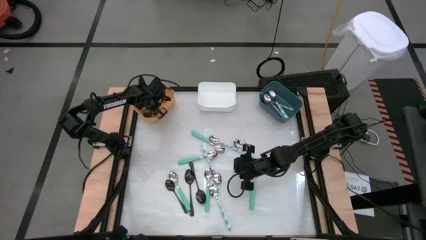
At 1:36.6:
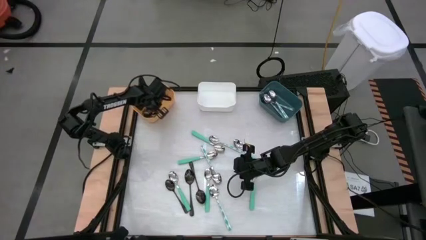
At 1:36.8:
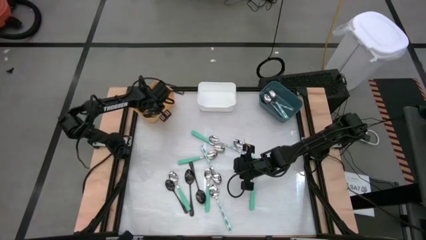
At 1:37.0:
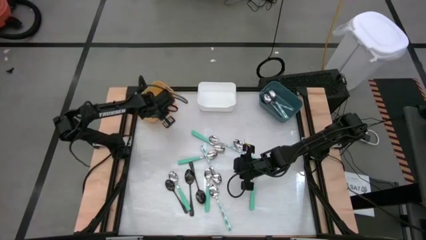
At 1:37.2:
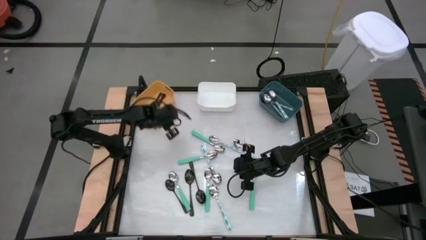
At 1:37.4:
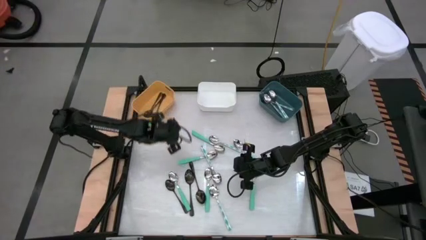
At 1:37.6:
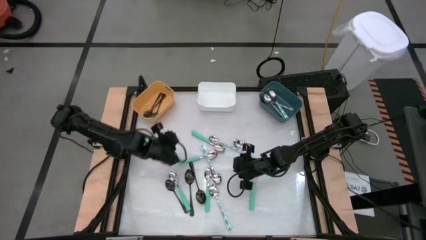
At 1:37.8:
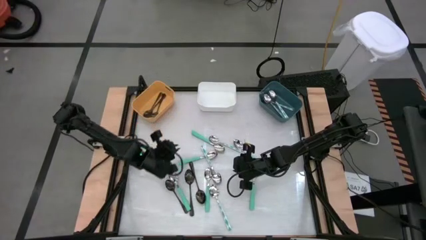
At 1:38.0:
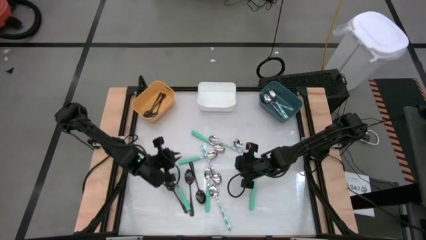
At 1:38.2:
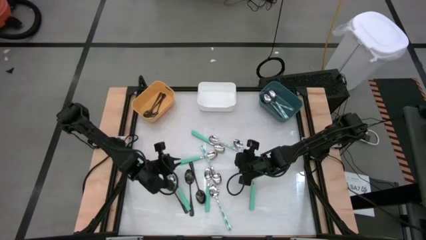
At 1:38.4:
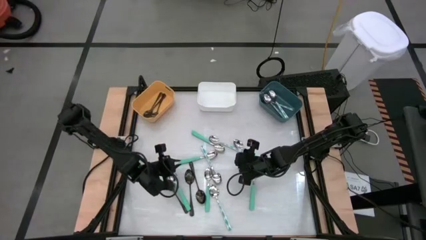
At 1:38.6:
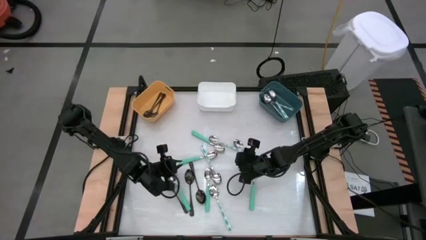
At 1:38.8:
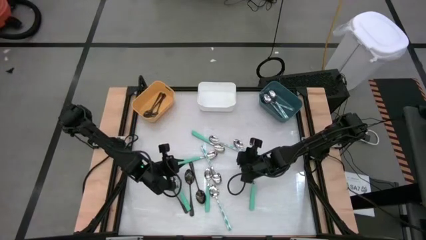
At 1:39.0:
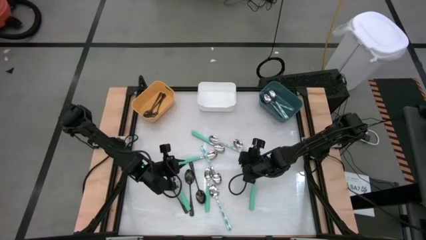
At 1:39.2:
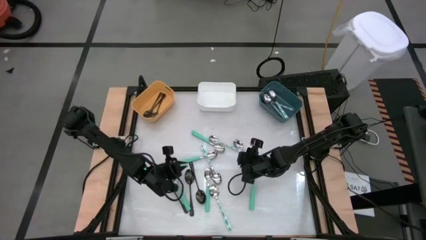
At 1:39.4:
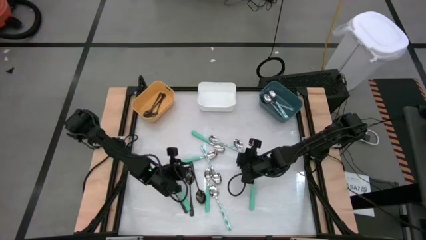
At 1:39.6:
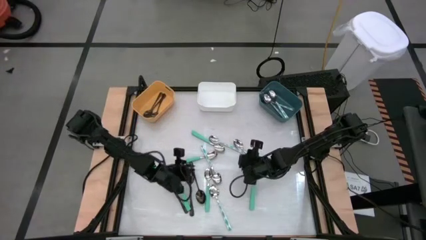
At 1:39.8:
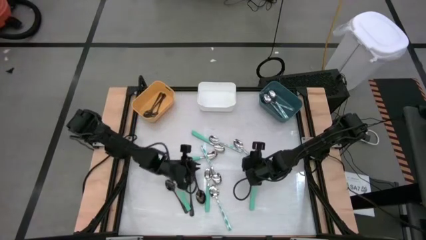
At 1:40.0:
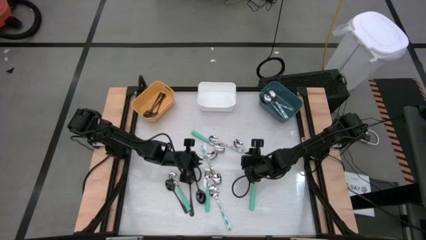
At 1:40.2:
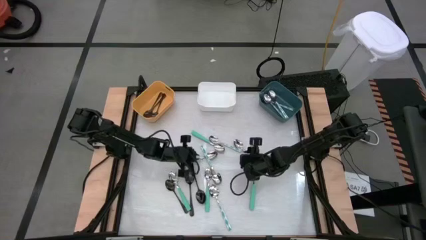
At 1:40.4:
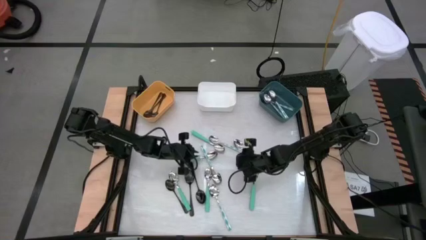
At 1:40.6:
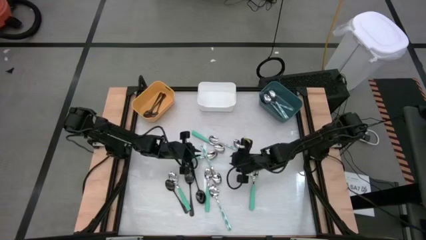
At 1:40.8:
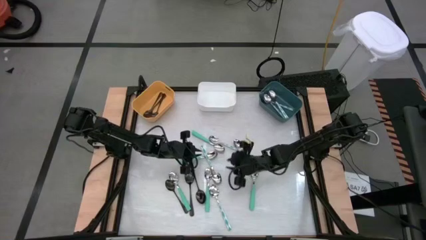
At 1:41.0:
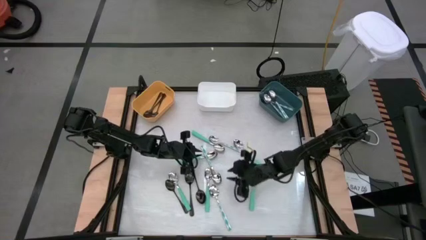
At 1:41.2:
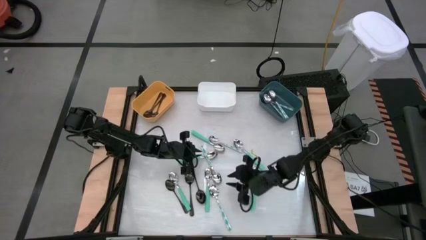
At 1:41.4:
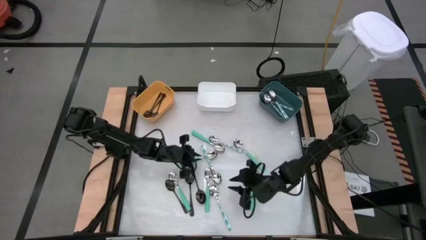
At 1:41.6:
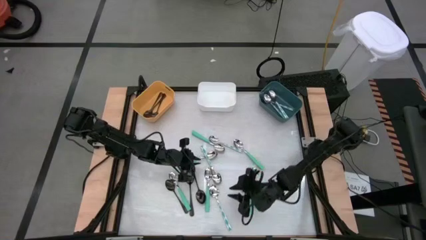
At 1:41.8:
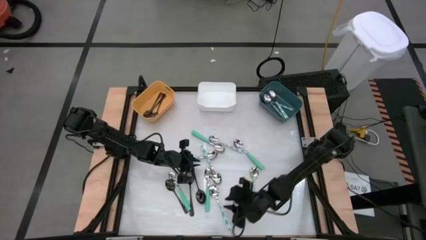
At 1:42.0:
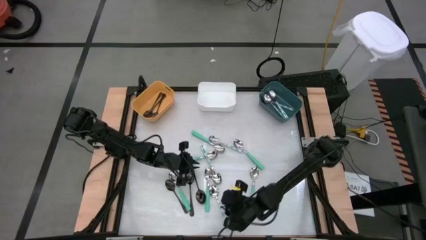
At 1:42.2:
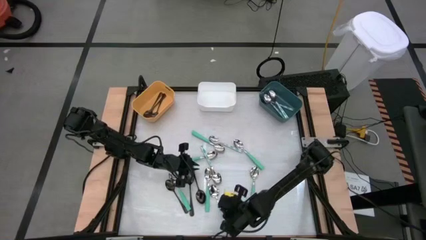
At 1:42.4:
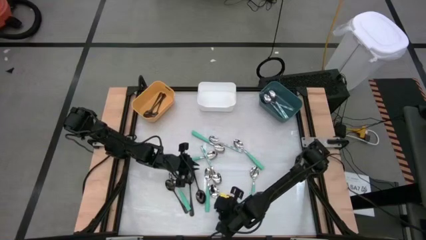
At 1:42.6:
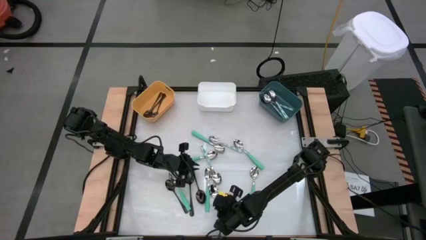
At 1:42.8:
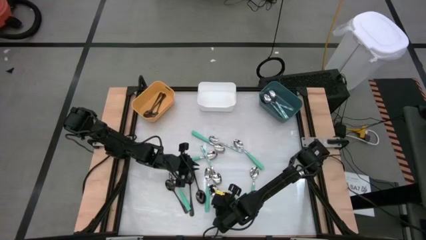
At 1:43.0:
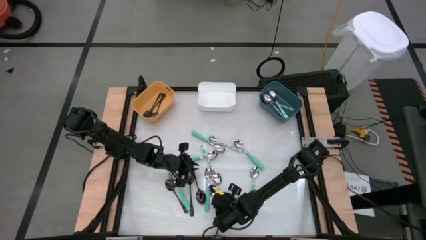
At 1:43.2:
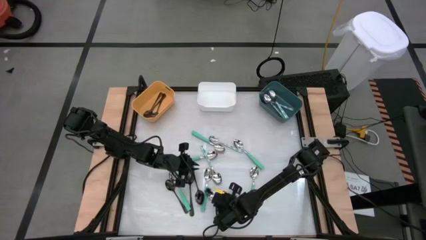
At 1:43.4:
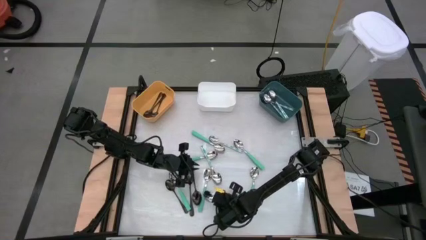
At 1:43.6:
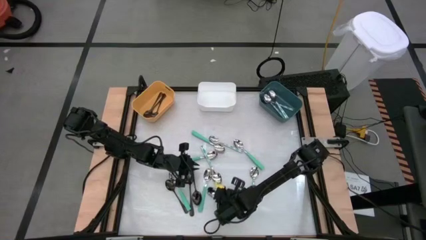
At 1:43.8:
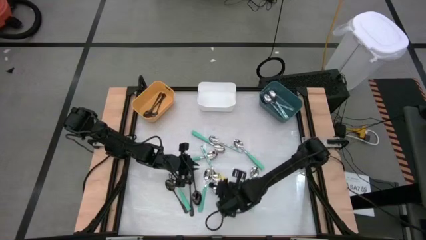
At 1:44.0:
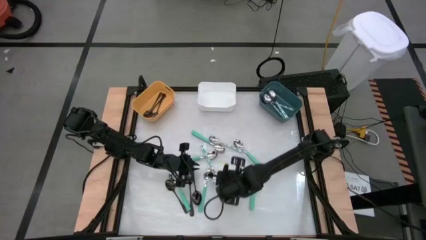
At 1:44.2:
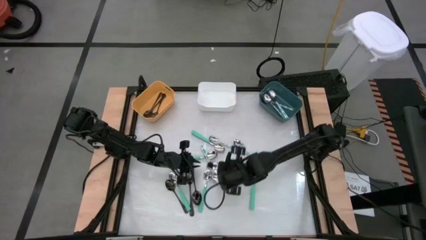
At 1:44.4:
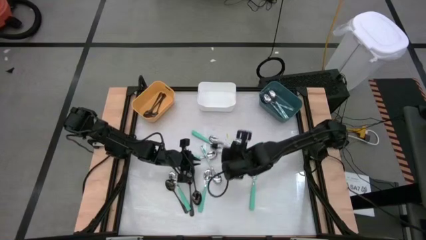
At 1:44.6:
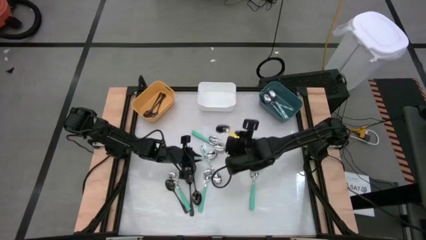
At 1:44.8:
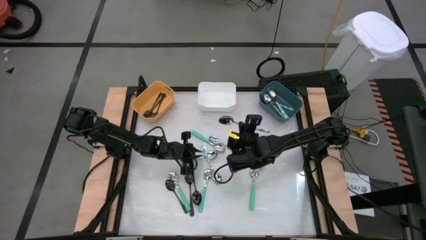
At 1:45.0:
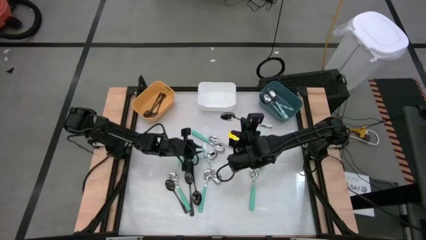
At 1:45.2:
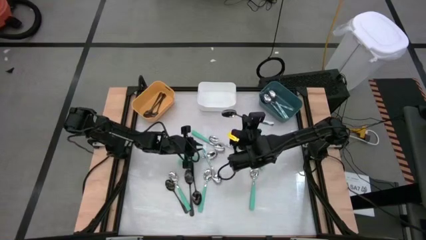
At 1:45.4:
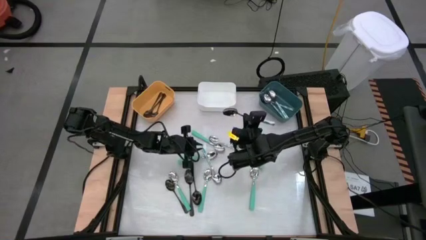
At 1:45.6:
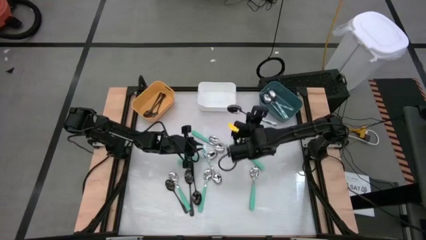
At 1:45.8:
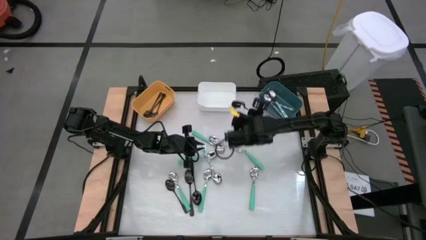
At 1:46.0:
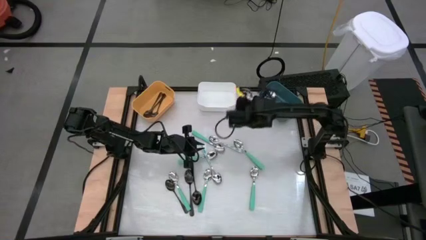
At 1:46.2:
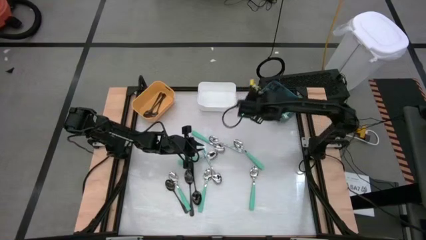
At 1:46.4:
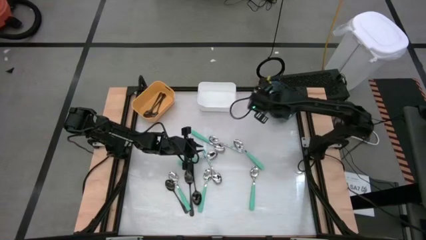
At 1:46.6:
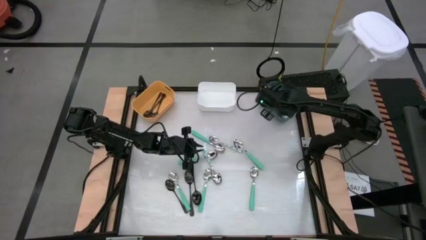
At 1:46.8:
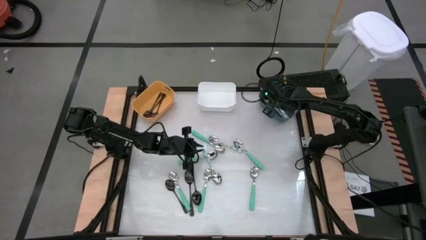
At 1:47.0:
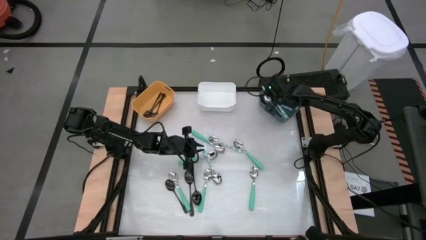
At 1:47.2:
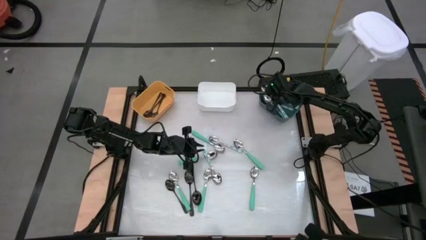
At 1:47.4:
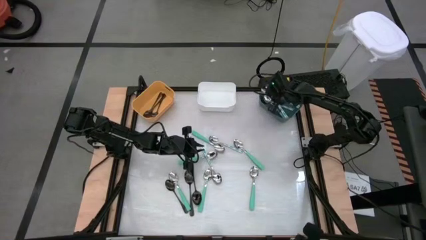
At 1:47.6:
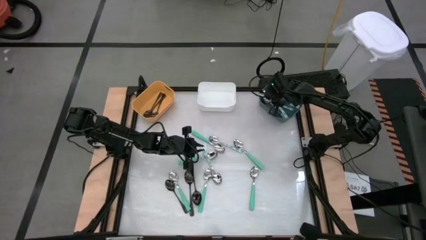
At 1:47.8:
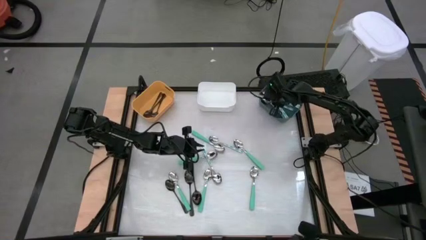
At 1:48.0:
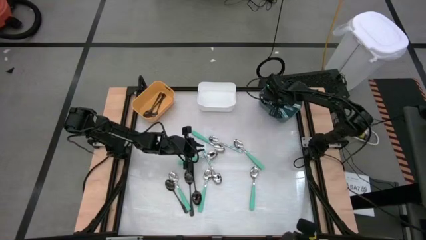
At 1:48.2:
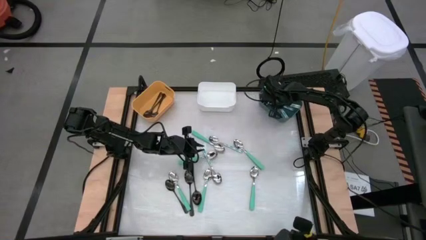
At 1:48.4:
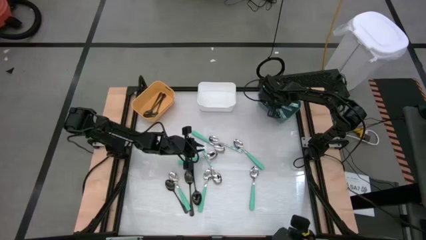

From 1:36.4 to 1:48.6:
Task: Sort silverware by color (type)
Put the blue patterned spoon into the blue bin

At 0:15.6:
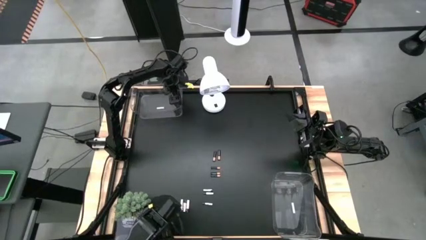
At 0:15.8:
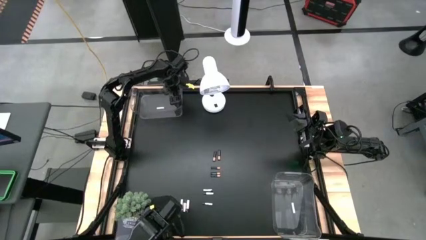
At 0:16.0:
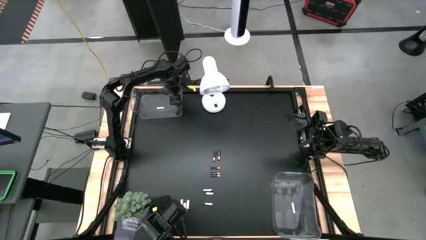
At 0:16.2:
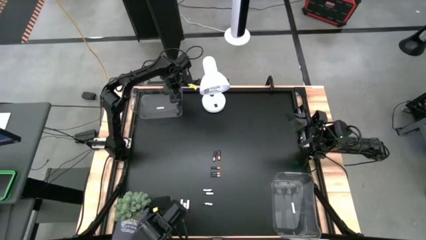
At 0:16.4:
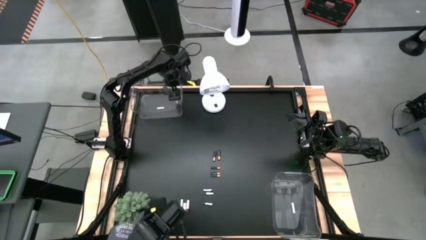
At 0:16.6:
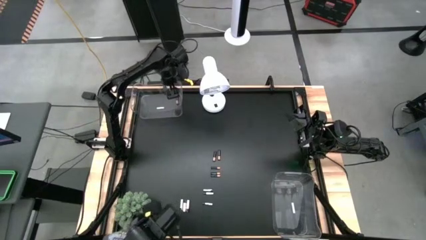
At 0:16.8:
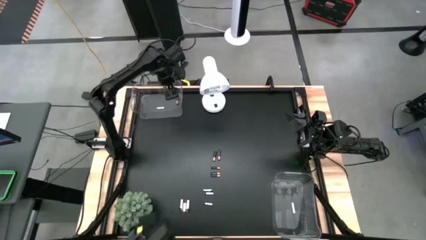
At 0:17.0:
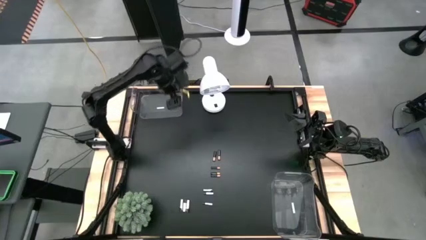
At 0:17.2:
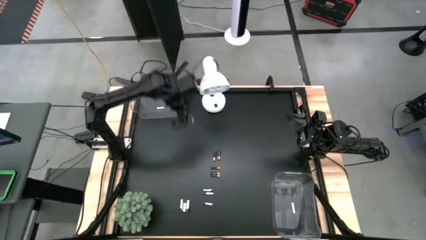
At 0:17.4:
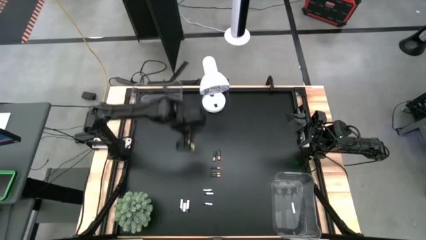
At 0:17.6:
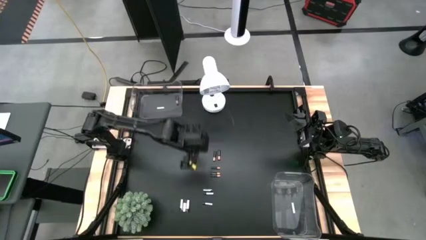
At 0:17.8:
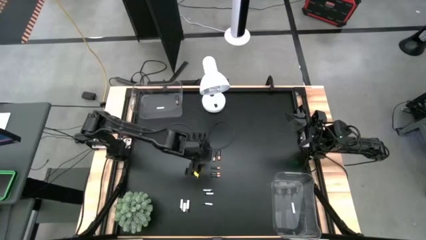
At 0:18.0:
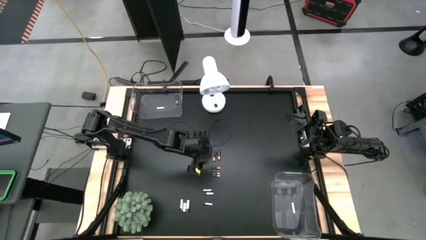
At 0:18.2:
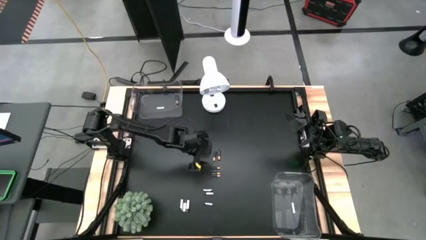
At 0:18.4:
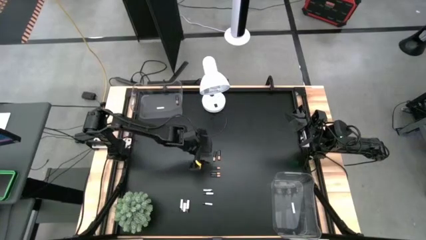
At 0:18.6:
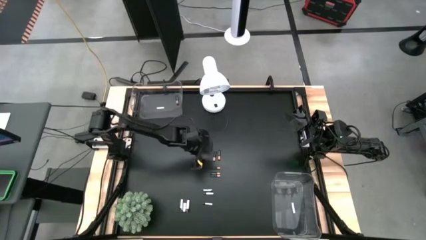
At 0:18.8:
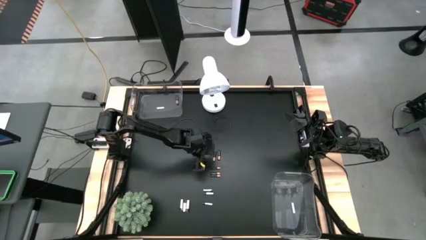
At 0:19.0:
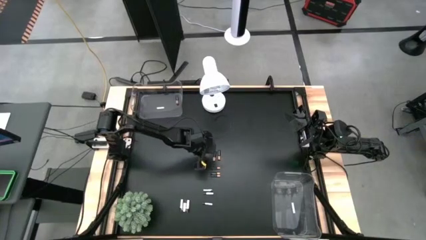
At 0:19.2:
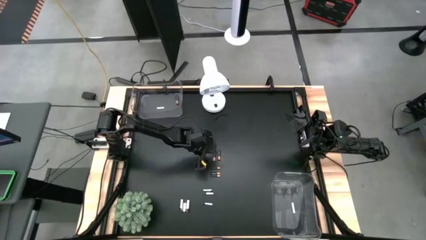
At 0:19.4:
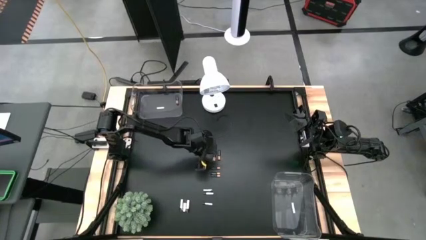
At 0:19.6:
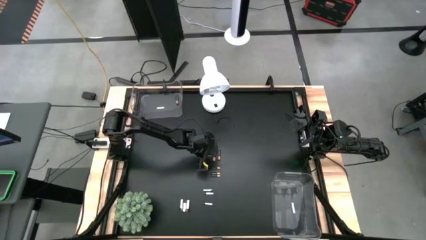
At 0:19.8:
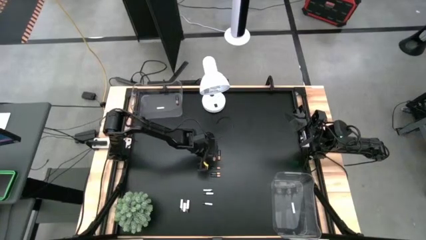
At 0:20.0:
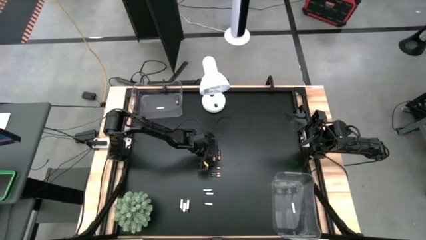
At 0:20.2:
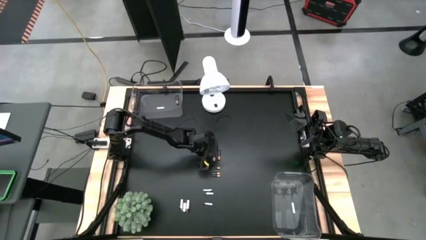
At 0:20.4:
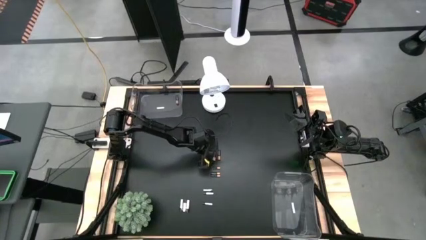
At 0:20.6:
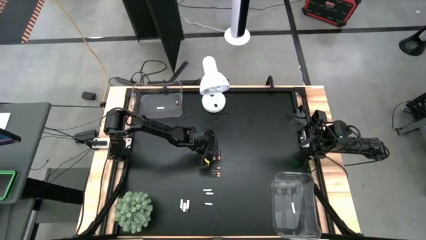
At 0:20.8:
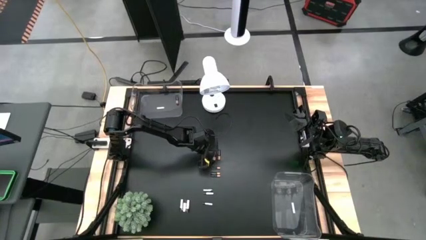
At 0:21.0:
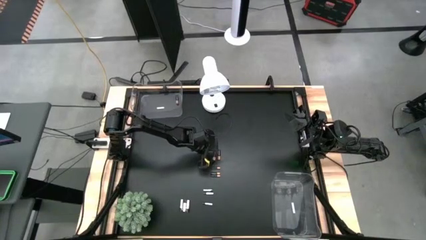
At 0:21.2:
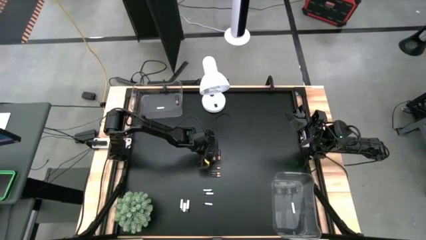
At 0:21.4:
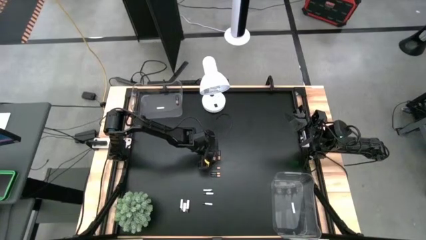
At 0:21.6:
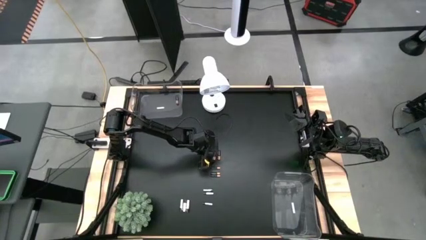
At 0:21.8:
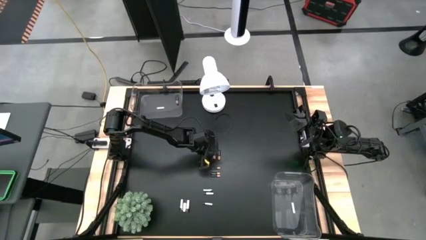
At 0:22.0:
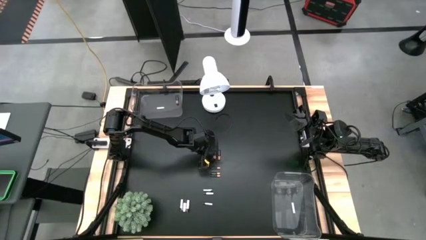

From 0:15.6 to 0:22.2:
Task: Sort batteries
Put the black battery into the top transparent bin
